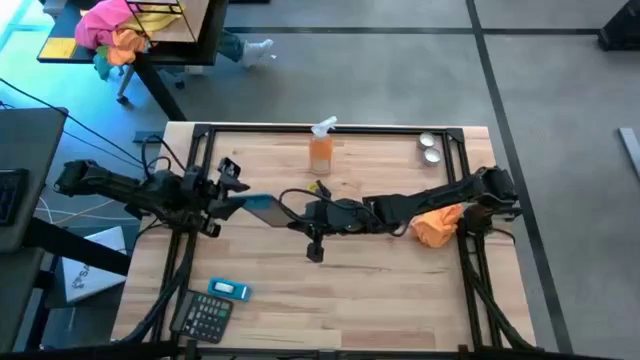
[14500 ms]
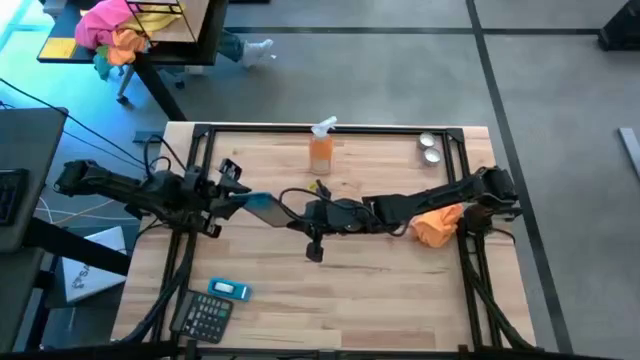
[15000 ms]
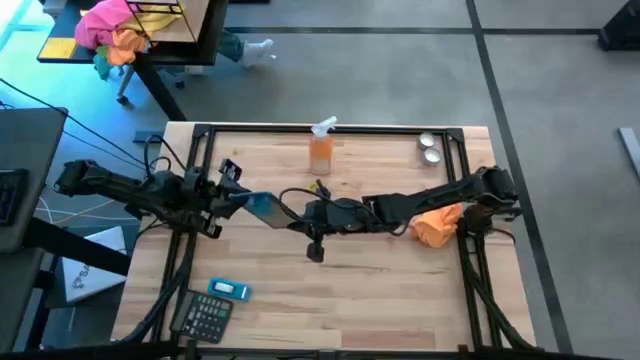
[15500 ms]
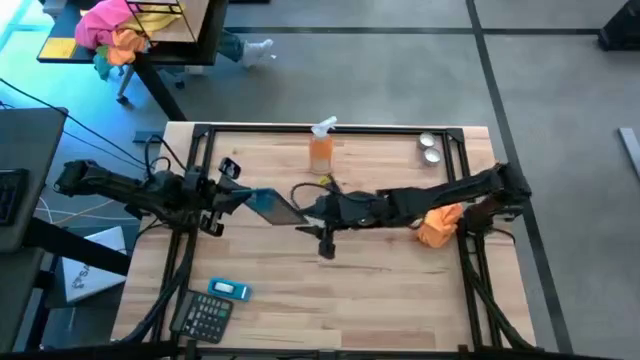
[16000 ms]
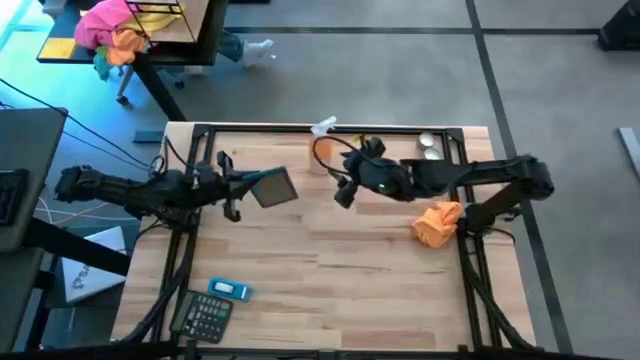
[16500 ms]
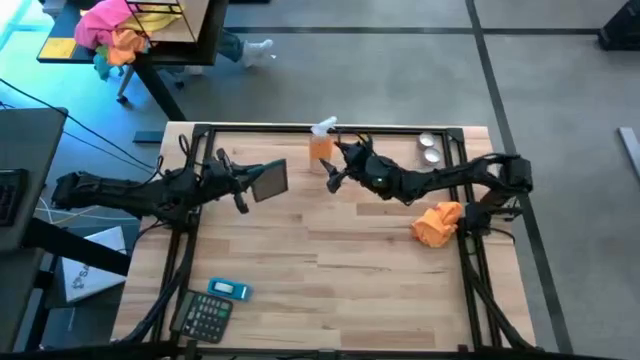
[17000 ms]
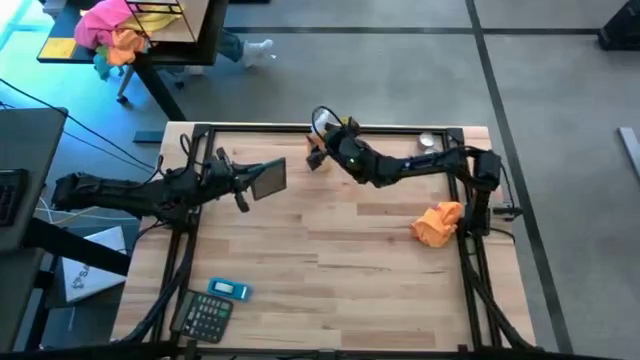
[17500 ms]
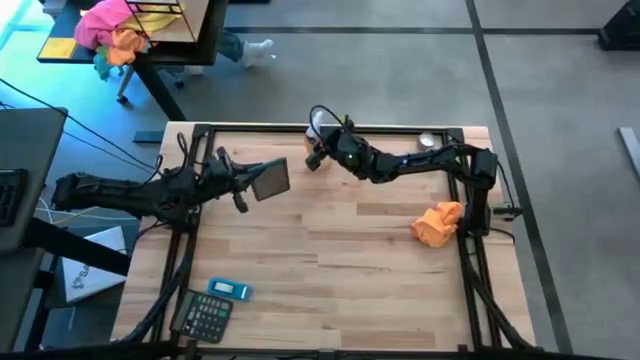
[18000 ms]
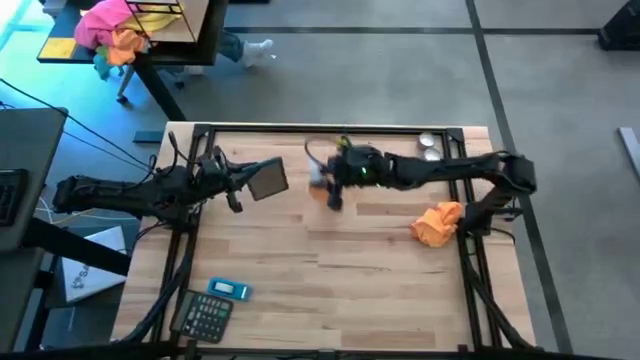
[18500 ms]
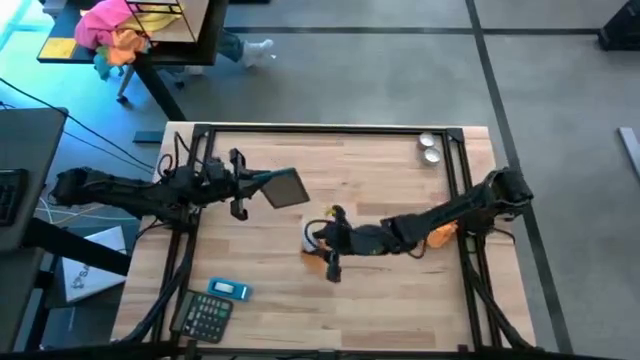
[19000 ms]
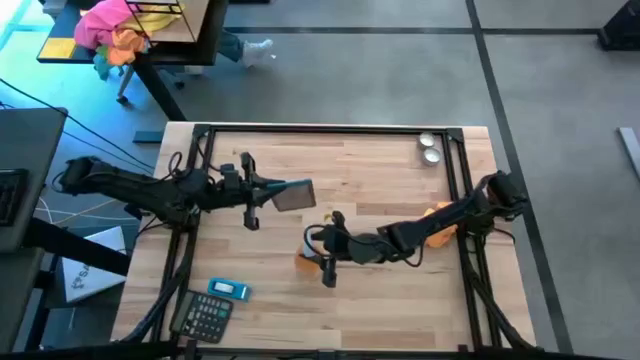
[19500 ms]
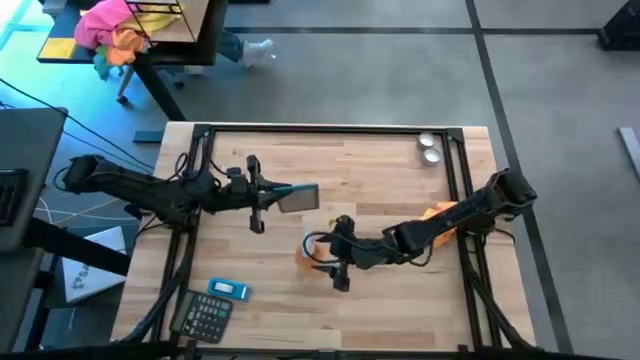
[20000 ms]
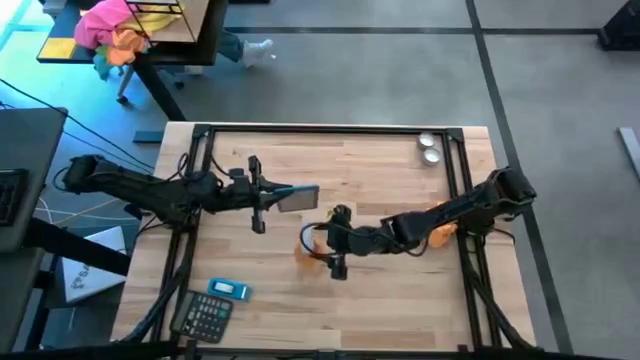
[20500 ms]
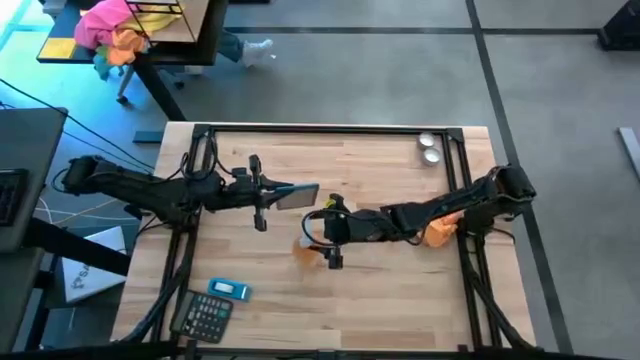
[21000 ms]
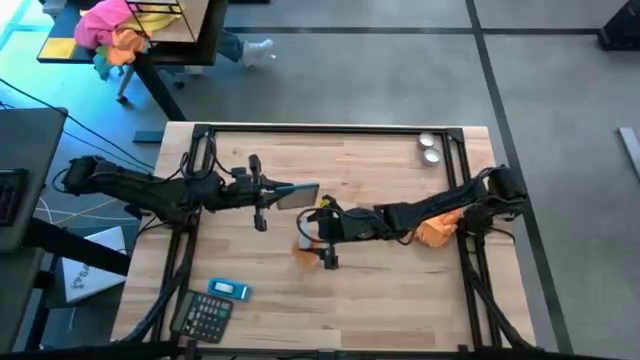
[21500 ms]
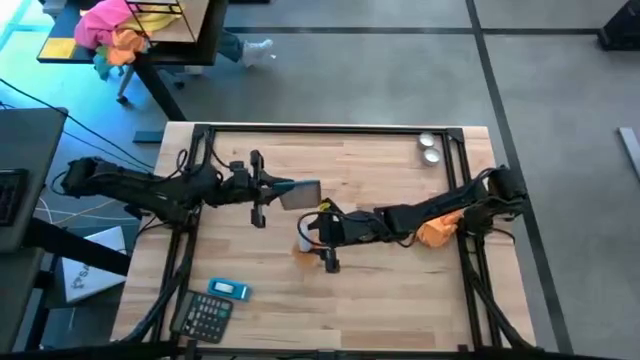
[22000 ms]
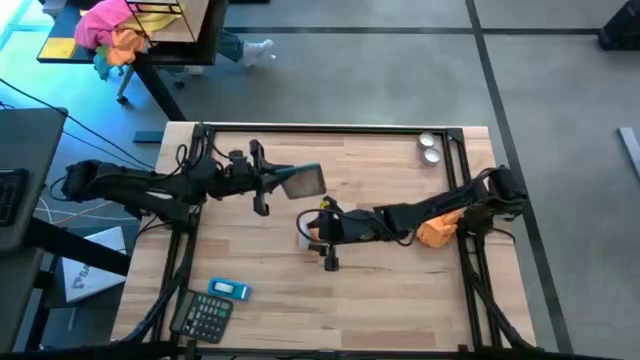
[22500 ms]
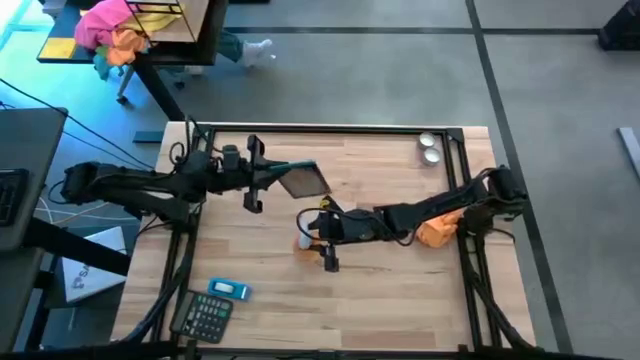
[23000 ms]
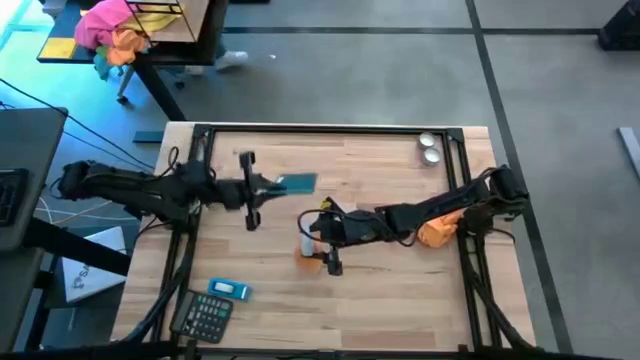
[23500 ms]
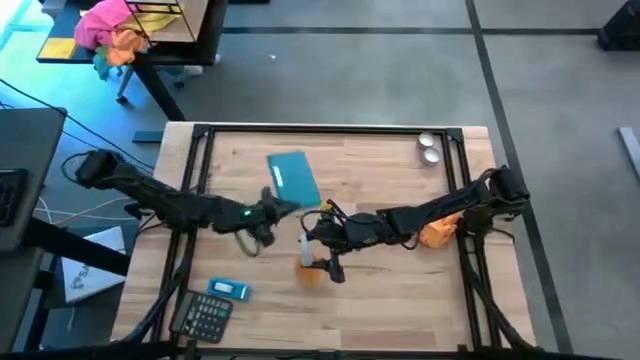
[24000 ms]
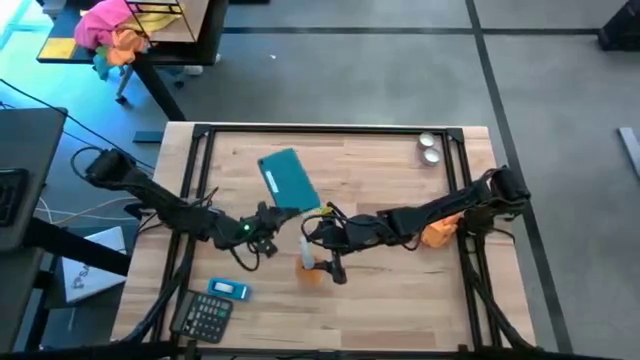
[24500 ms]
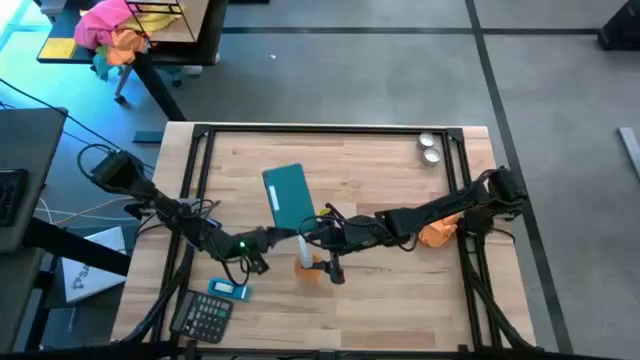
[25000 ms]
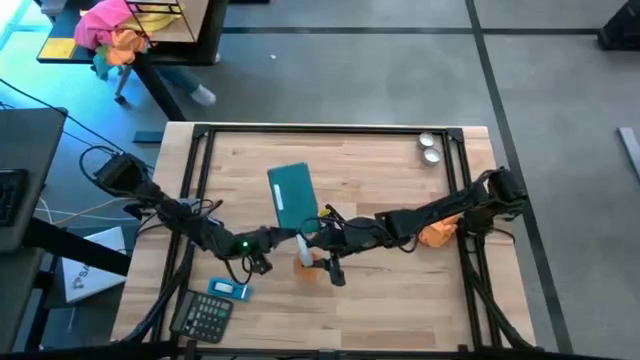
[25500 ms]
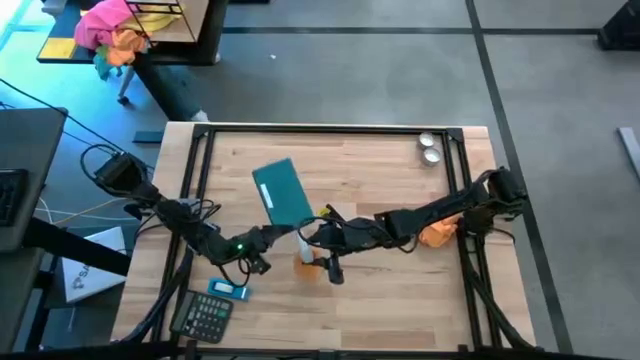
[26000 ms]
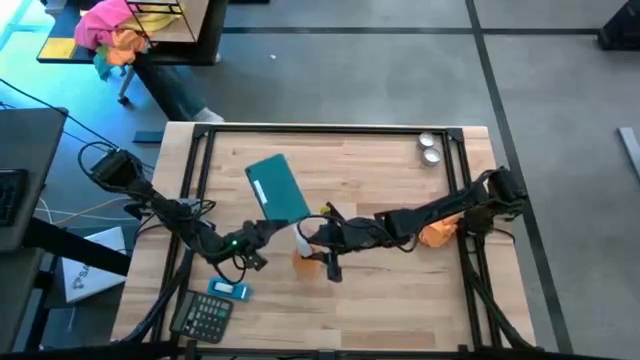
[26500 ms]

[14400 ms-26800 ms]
Task: Apply microfiber cloth
Spray the tablet using the spray bottle

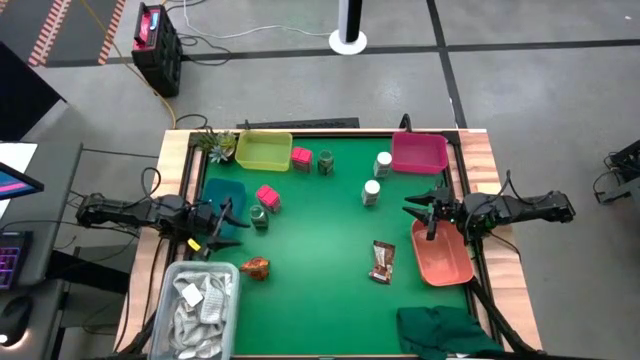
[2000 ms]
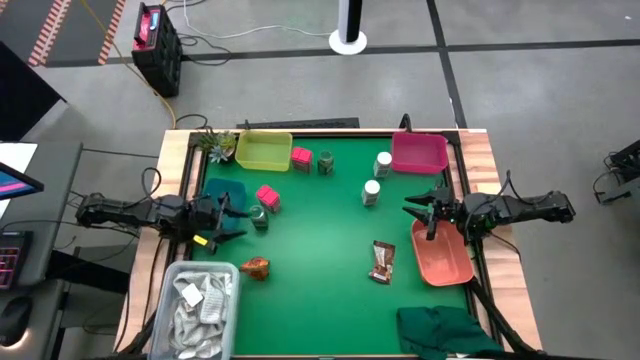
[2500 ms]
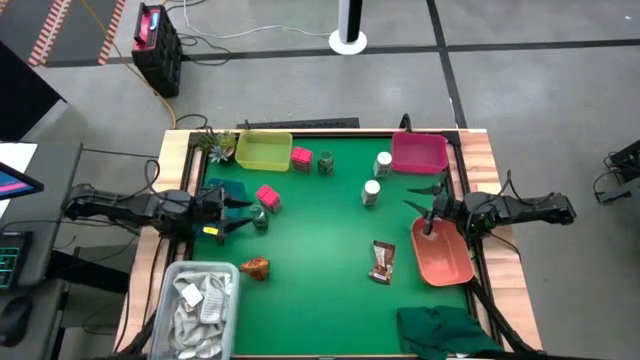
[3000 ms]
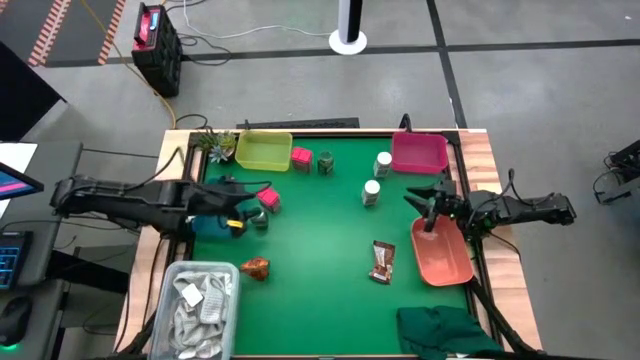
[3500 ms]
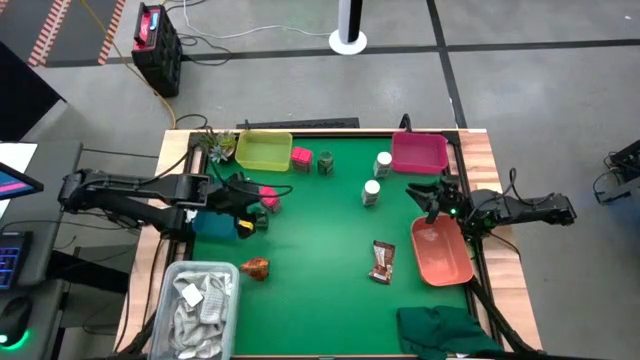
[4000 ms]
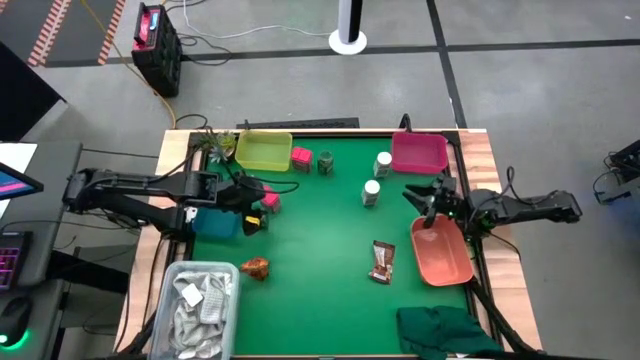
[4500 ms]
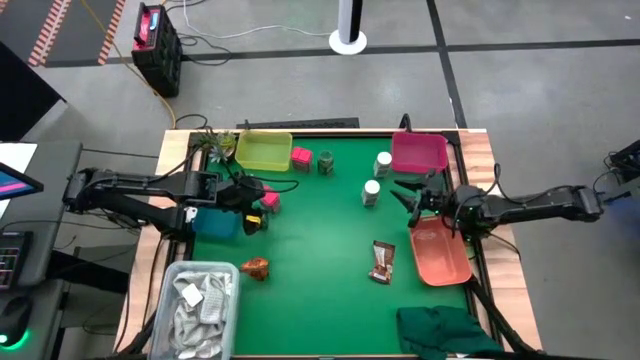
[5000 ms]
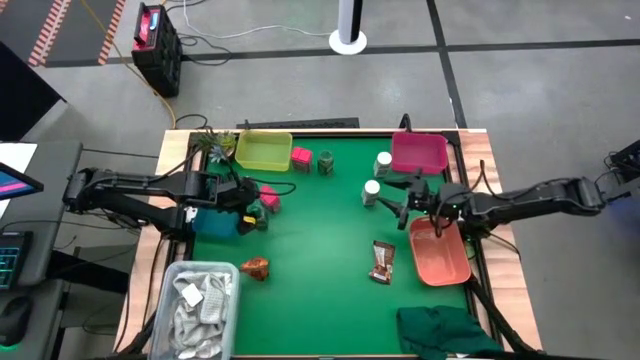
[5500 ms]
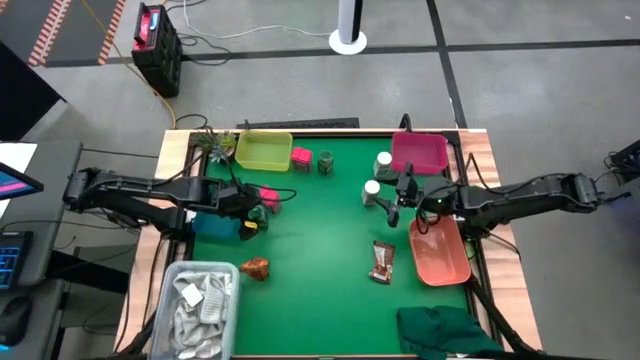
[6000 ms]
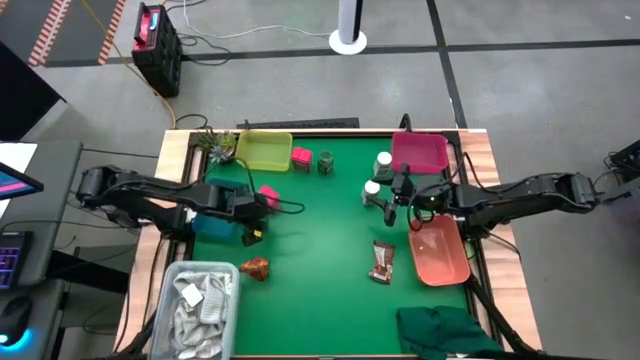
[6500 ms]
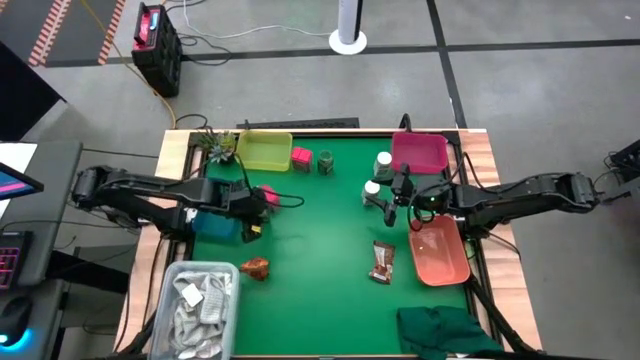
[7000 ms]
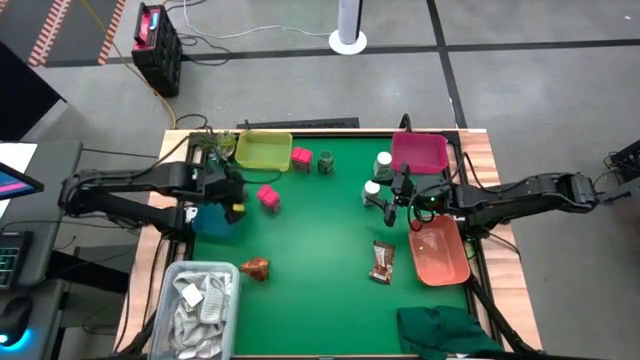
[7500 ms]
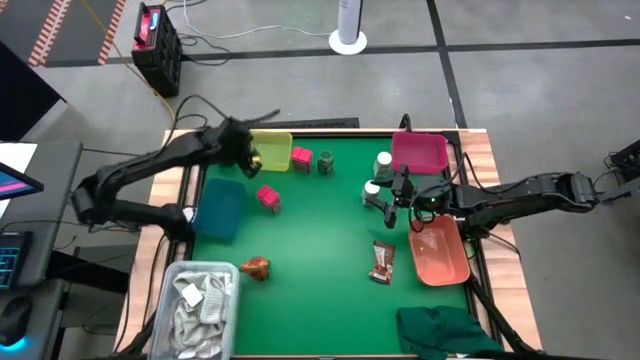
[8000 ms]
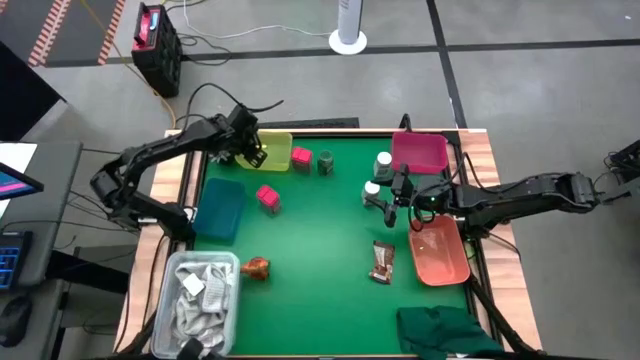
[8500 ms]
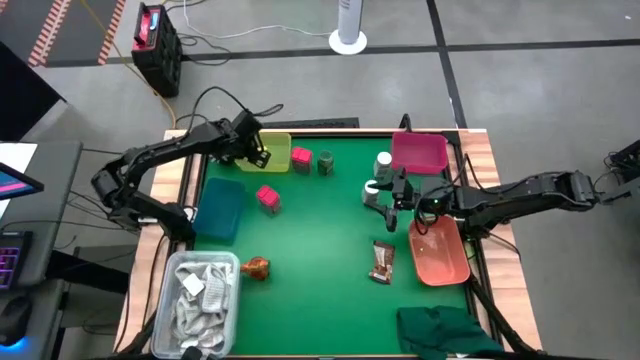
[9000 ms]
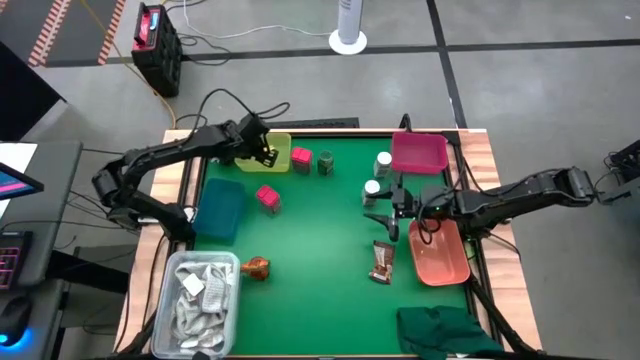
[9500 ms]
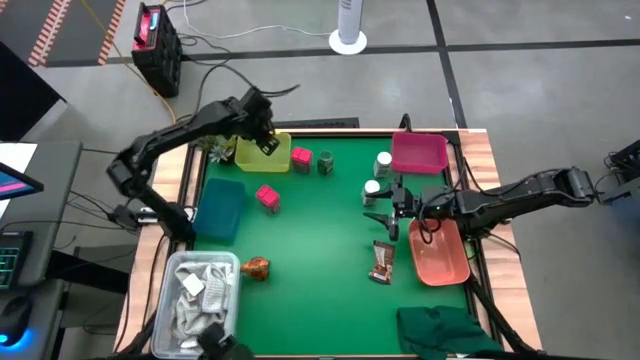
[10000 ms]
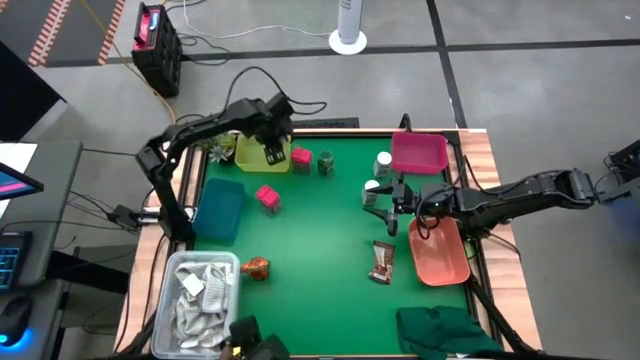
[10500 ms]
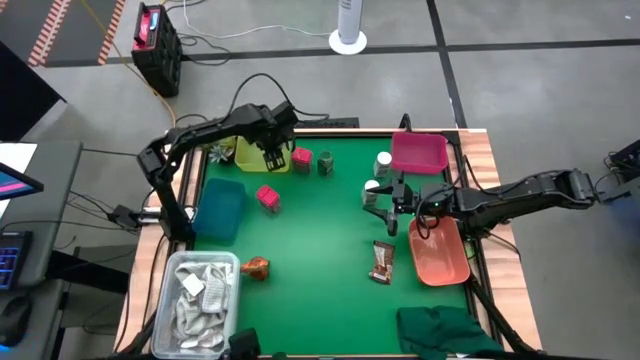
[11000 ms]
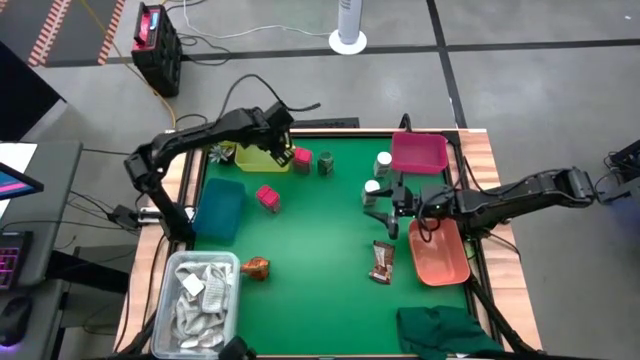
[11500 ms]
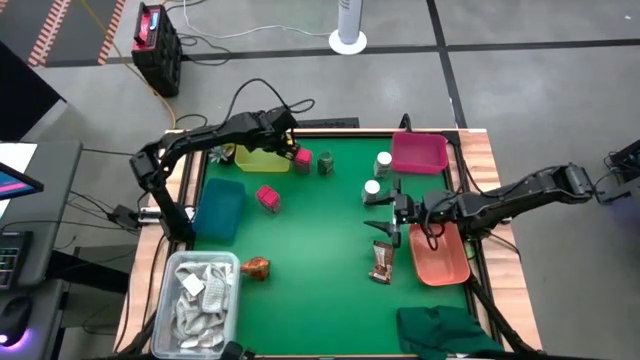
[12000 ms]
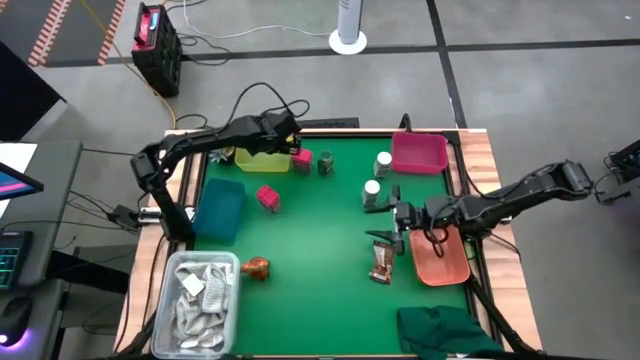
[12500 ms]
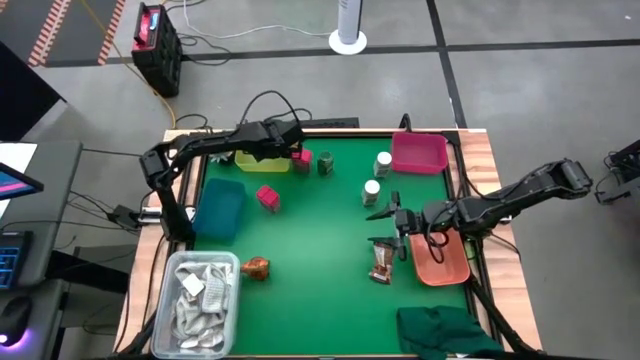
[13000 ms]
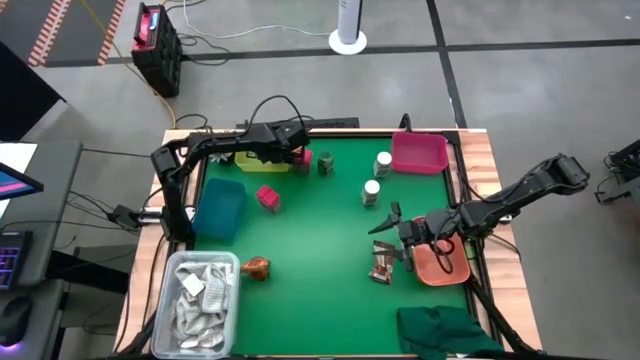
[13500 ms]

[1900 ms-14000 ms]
Task: Sort spices by type
Put the bottom green seasoning bottle into the yellow bin
